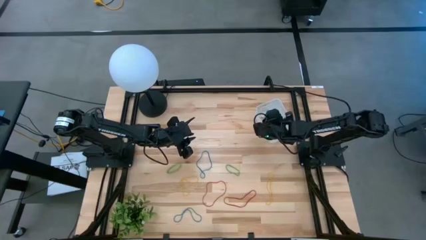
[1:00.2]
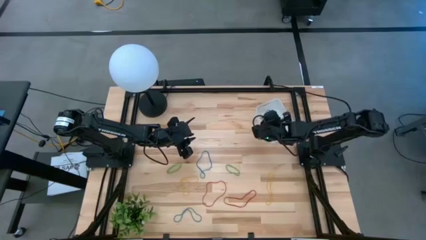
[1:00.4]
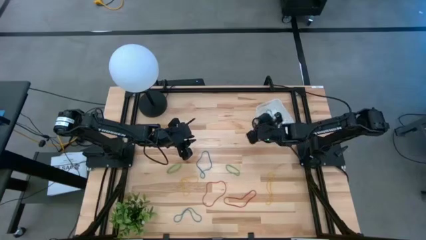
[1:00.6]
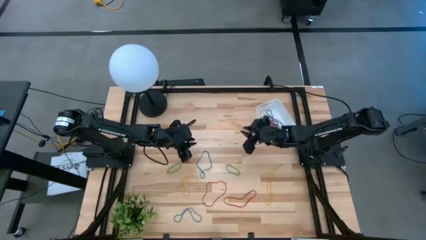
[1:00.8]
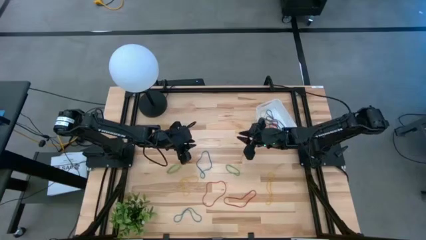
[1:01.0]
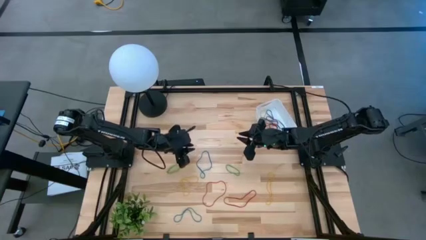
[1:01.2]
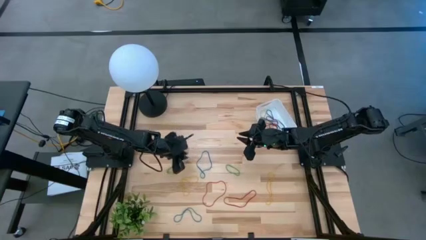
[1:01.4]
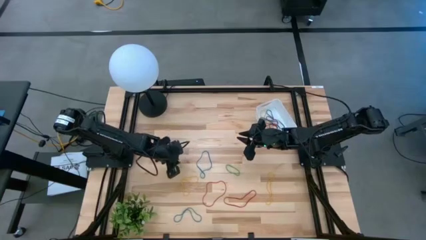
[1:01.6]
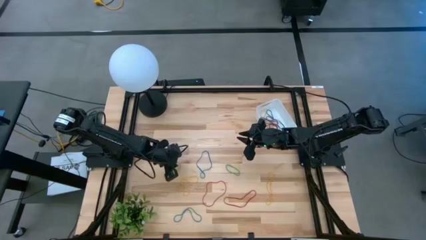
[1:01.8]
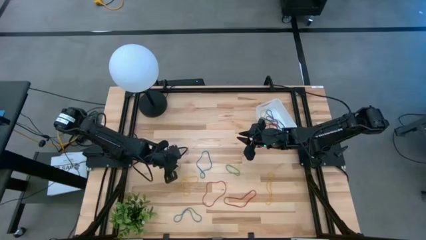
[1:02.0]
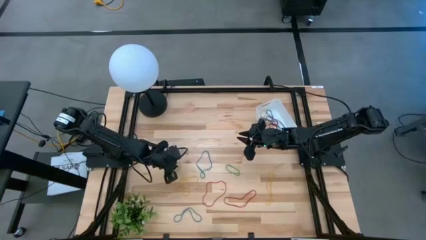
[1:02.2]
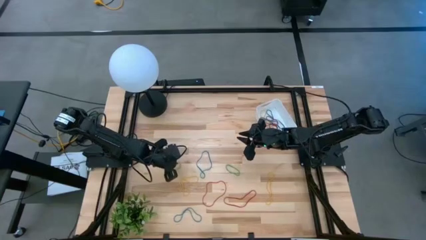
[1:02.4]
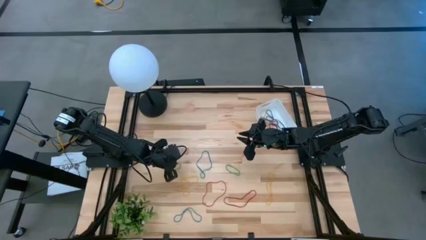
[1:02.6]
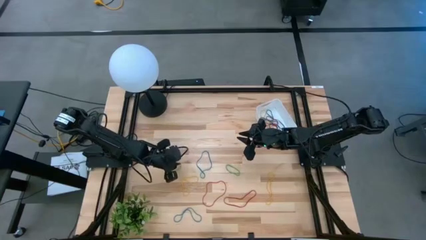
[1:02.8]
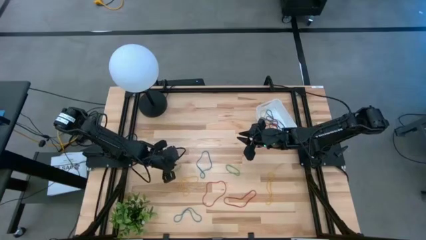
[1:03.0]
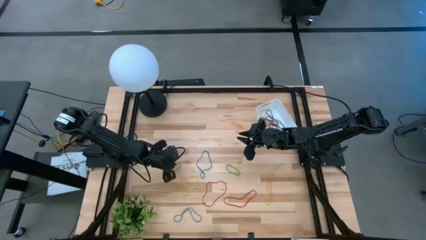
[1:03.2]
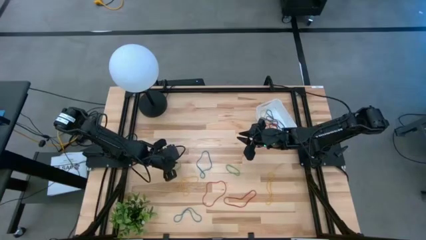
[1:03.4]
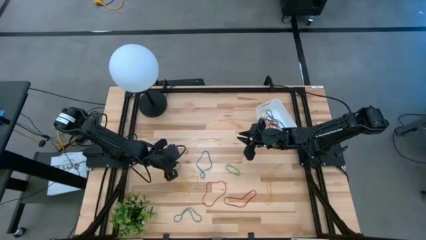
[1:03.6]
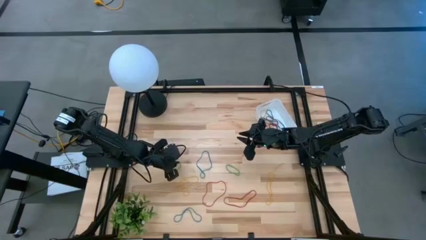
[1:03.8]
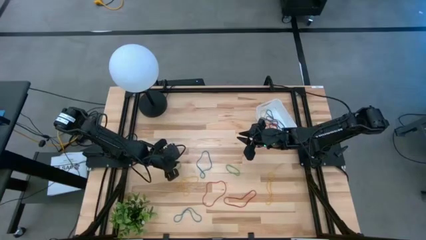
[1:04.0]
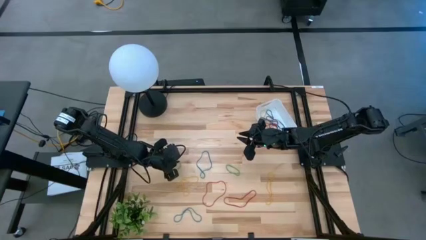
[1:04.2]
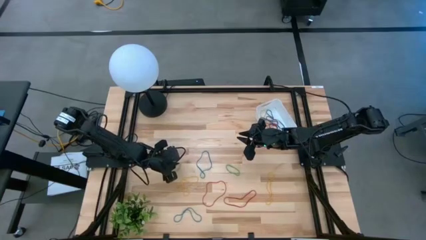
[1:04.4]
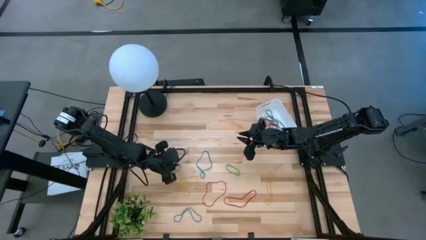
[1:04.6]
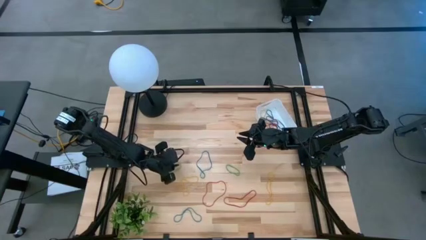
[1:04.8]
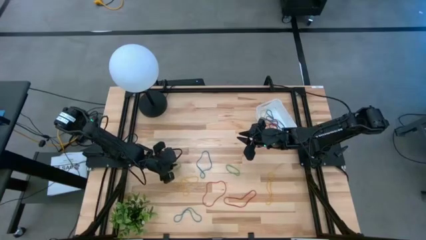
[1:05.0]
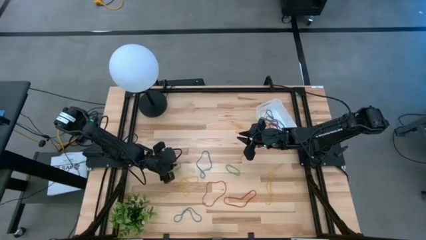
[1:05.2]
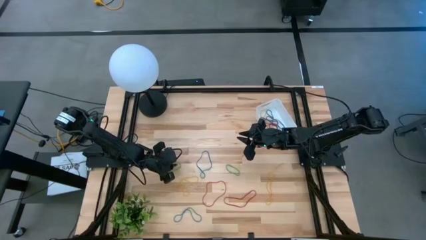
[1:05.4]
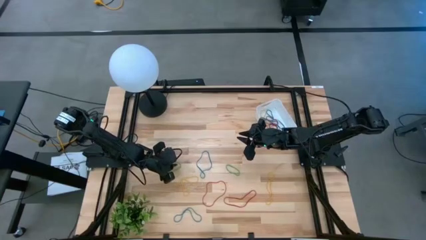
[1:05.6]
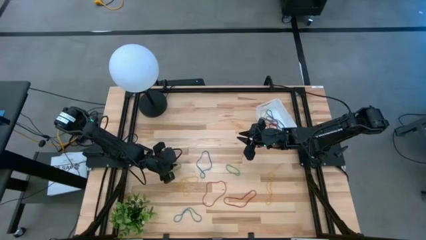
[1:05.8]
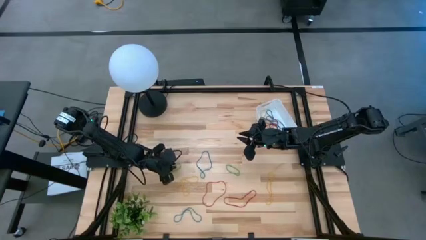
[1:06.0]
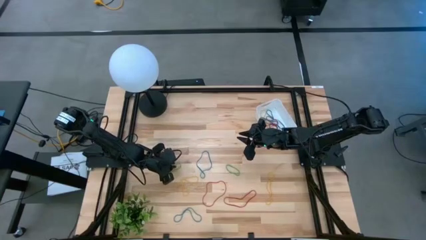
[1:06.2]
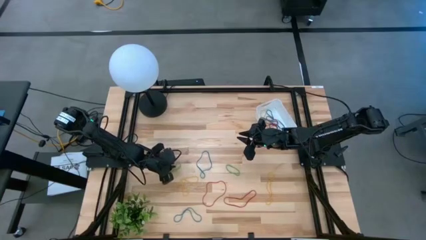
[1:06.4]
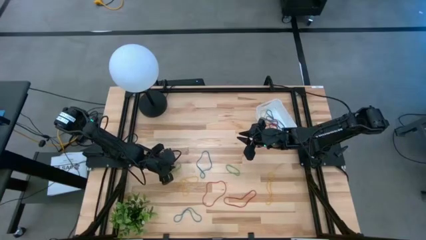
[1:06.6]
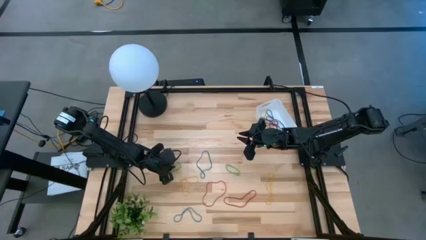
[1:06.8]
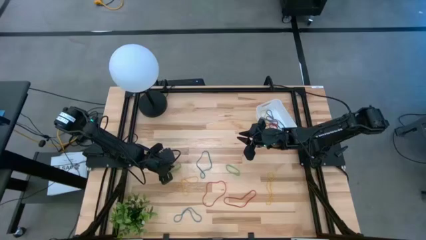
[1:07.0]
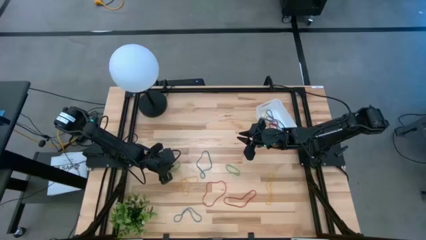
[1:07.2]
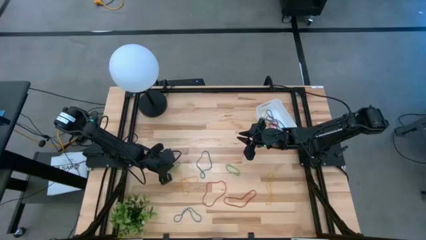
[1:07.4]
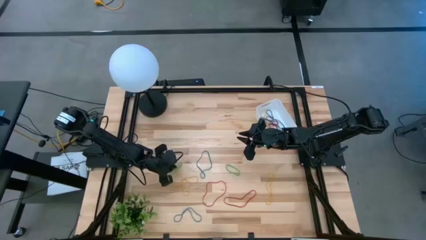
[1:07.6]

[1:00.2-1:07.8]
Task: Pick and place items into bin
Put the left green rubber band into the white bin

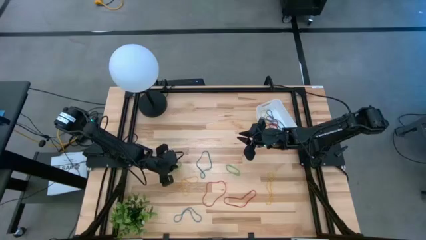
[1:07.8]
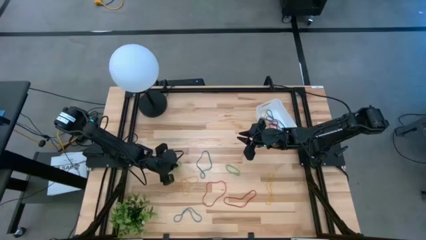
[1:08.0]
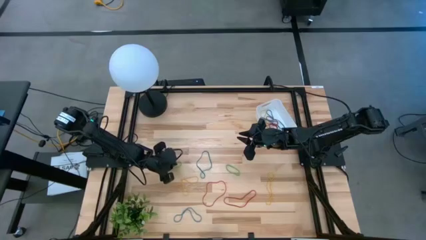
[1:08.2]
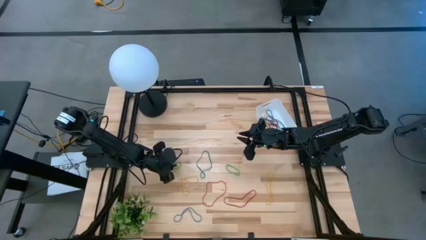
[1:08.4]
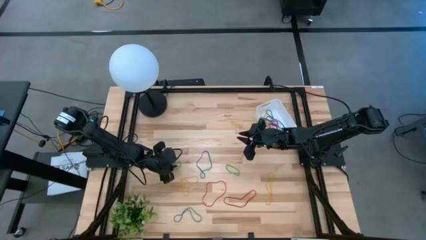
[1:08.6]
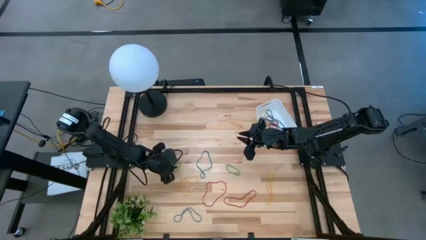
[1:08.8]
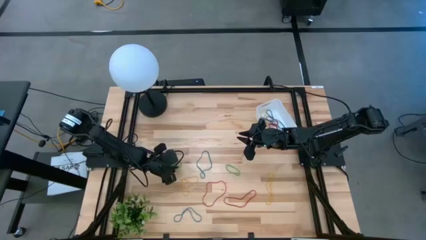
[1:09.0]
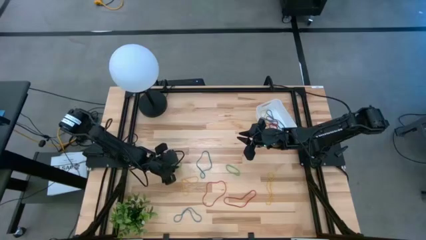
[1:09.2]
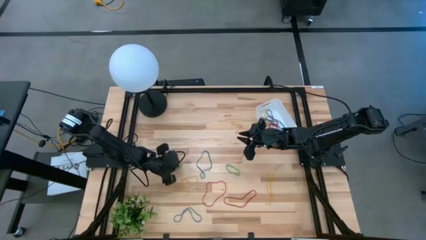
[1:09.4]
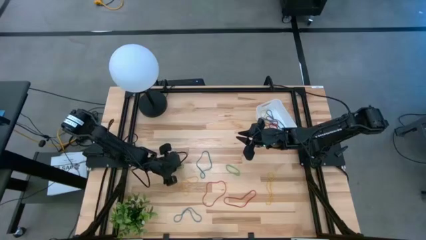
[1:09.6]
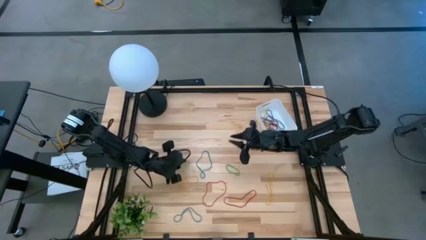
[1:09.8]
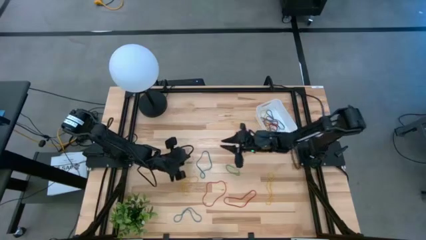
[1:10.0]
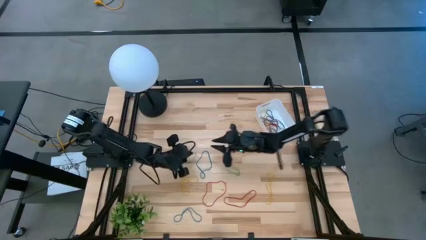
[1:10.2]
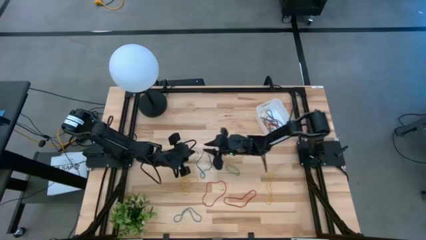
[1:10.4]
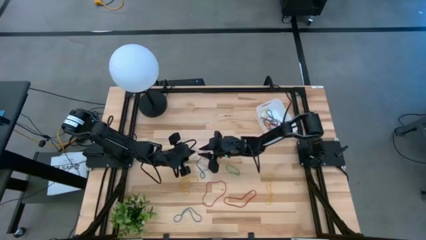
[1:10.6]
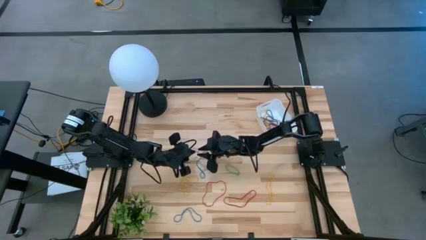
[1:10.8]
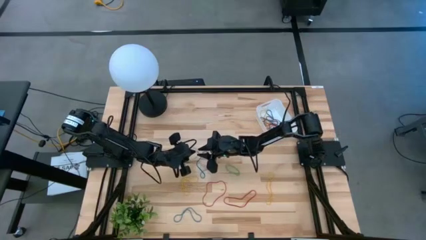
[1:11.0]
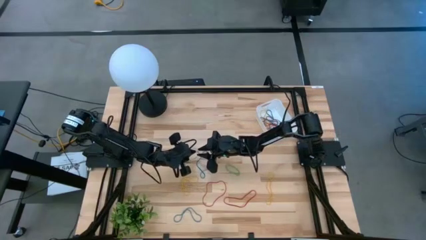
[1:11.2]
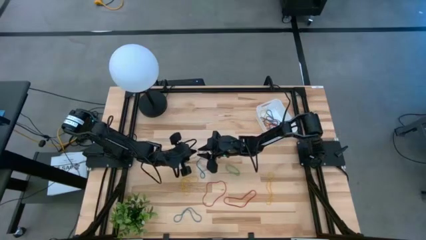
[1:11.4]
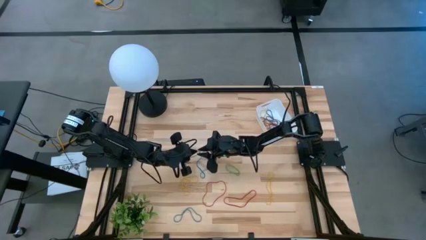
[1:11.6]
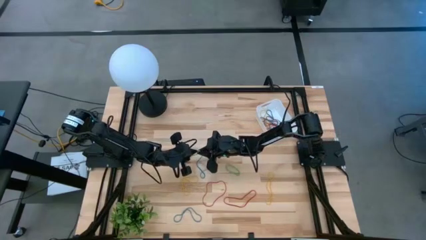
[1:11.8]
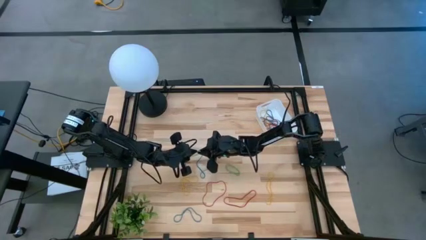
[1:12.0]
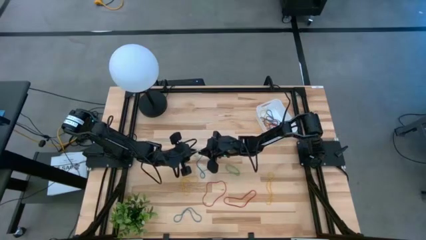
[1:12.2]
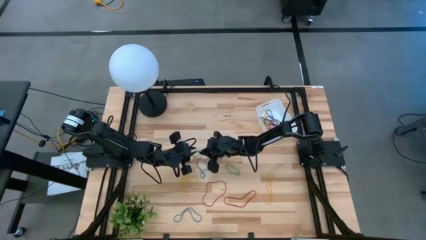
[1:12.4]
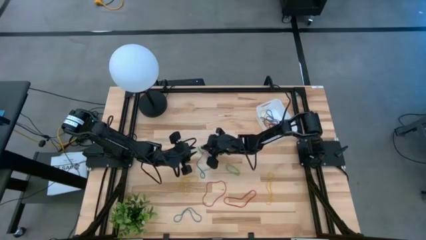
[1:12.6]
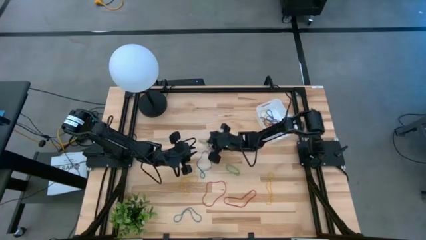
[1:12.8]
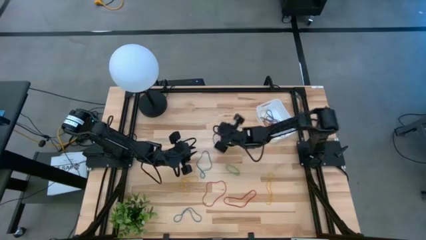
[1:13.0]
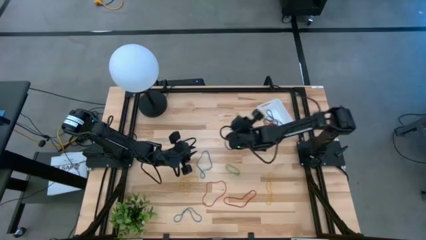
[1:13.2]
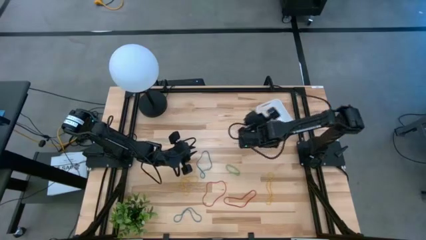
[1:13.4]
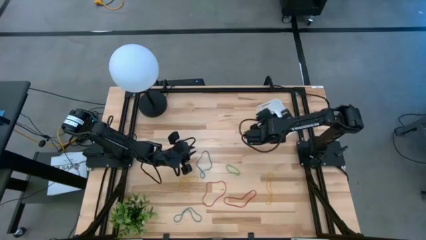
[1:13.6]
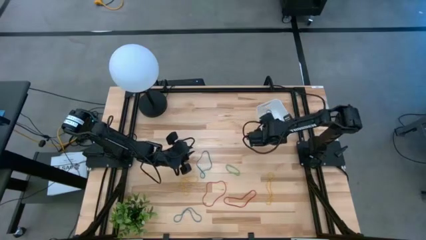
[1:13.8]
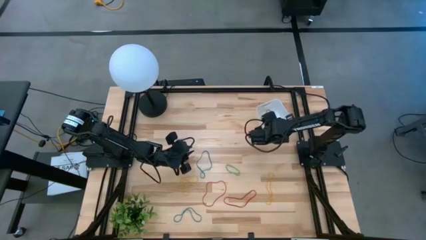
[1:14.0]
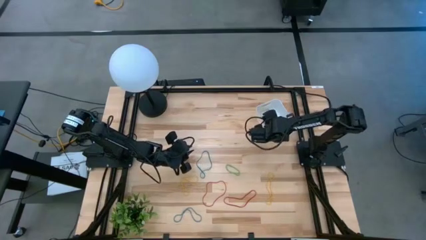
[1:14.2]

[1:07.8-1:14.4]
Put the left green rubber band into the white bin

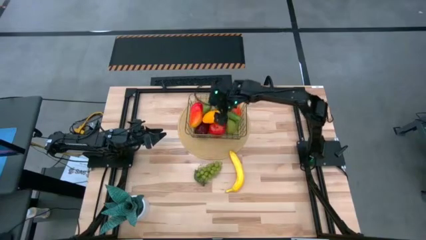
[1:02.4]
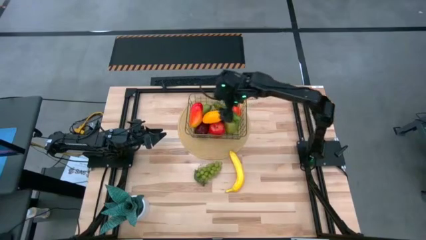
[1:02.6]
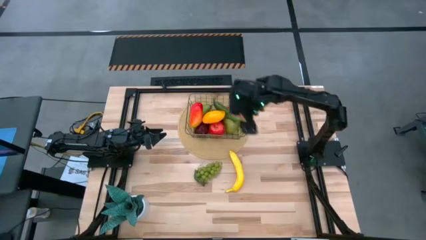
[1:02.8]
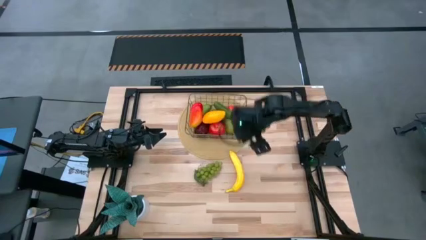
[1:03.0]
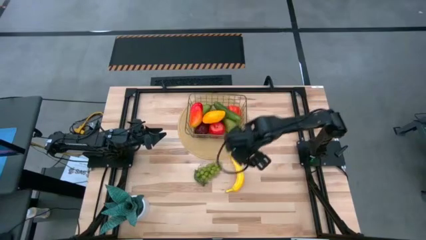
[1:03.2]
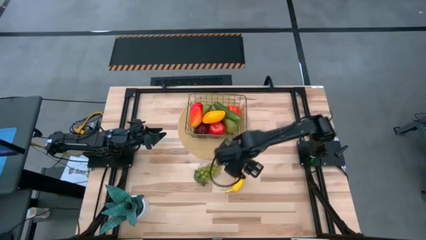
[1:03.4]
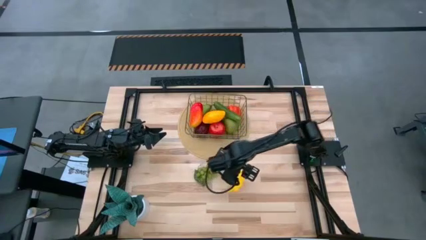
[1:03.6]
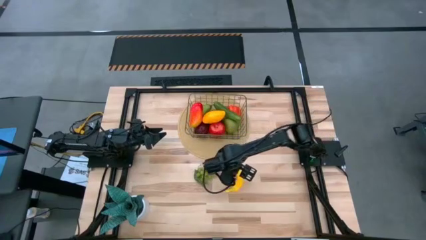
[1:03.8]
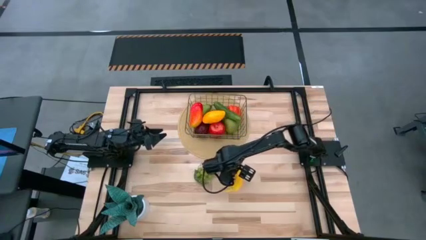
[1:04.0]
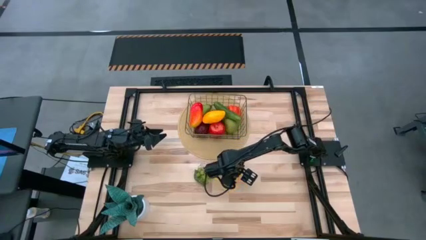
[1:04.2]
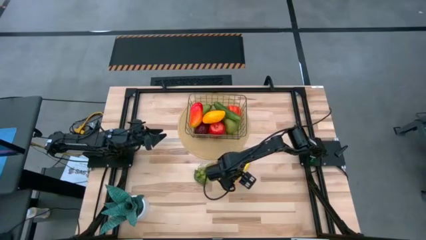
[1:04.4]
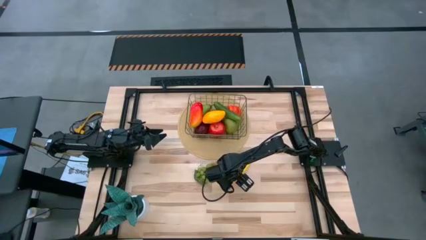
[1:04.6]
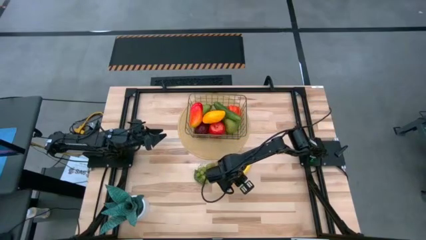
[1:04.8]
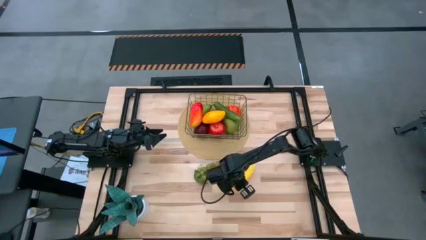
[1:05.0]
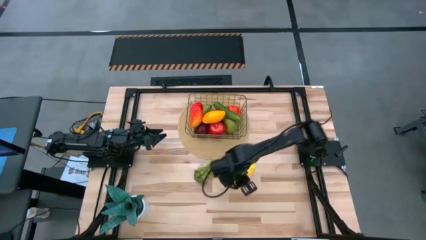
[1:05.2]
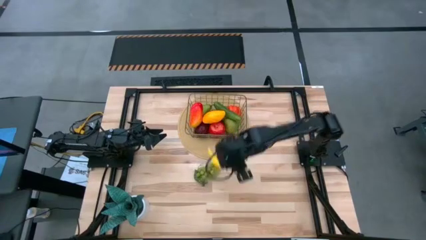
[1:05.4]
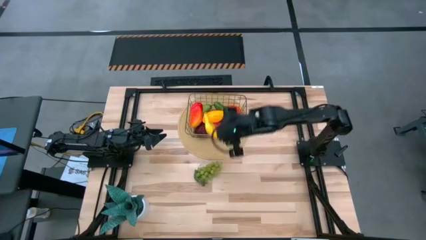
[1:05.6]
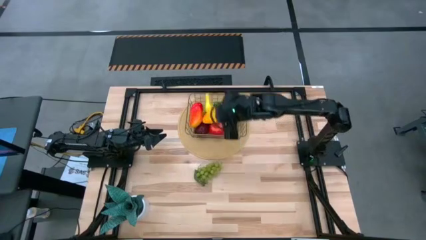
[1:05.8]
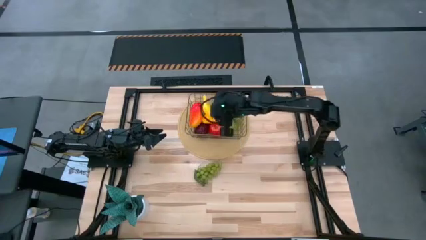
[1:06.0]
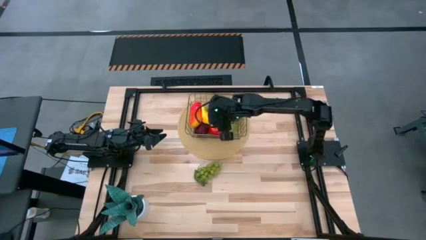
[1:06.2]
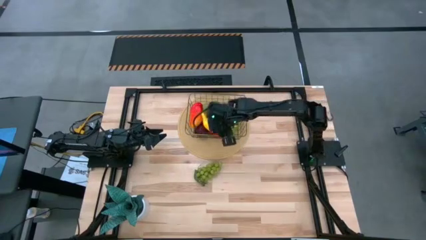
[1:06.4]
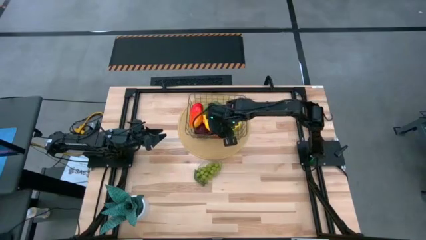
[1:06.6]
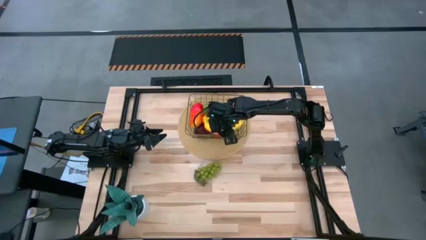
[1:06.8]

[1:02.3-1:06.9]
Task: Build produce basket
Put the yellow banana into the wire basket
